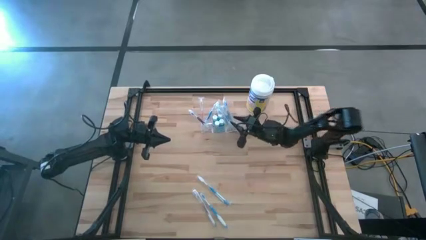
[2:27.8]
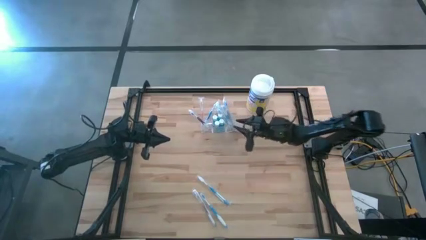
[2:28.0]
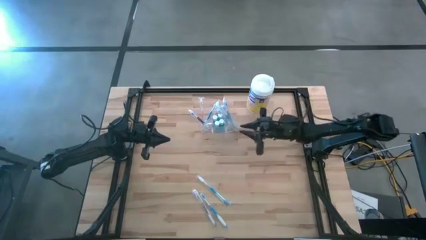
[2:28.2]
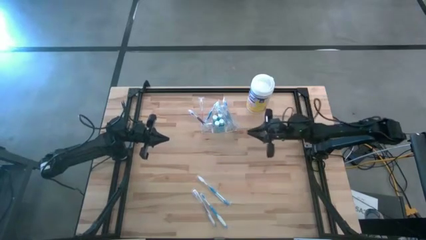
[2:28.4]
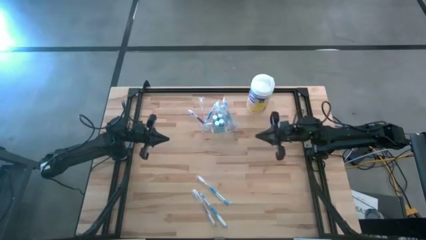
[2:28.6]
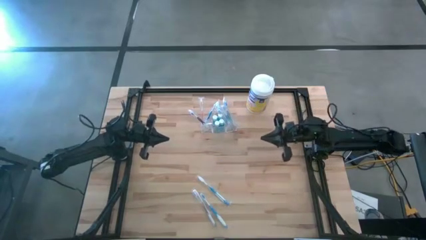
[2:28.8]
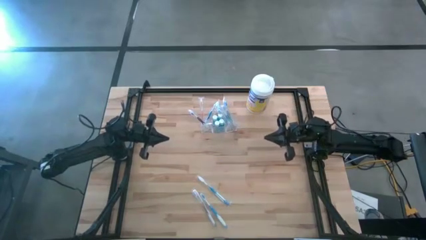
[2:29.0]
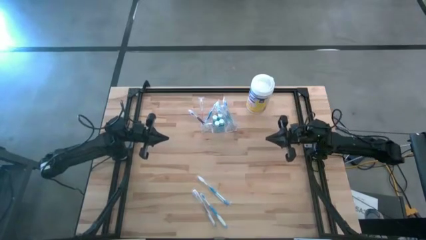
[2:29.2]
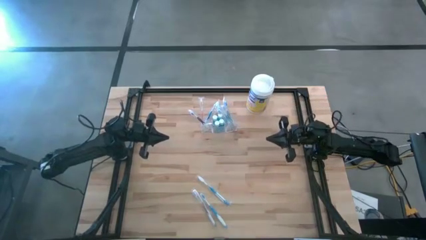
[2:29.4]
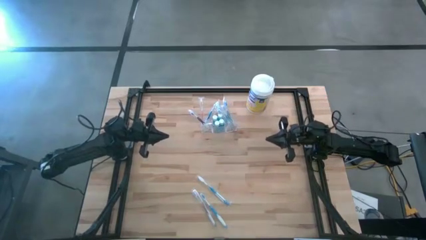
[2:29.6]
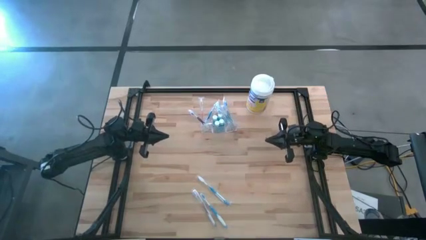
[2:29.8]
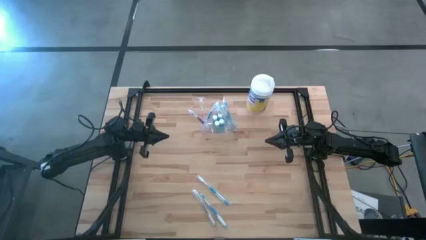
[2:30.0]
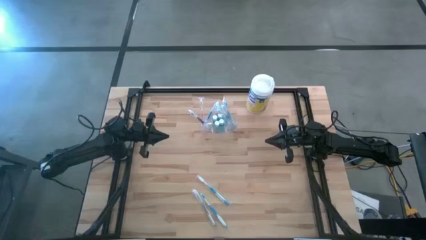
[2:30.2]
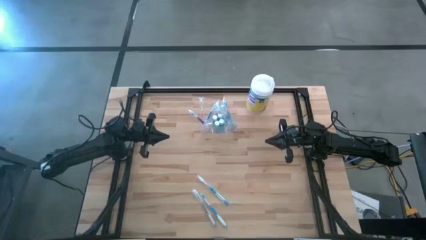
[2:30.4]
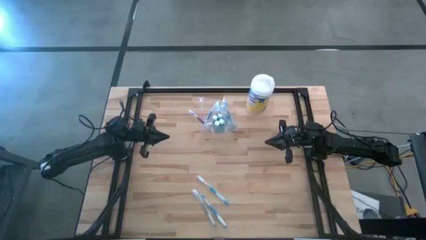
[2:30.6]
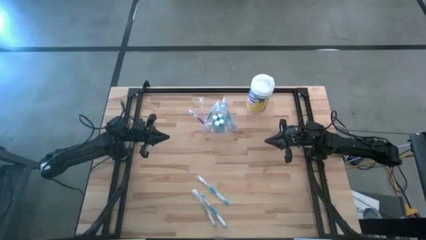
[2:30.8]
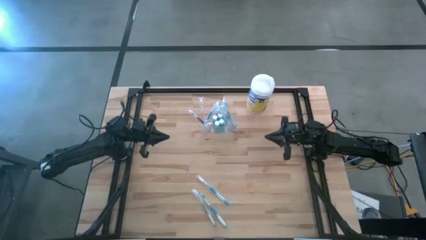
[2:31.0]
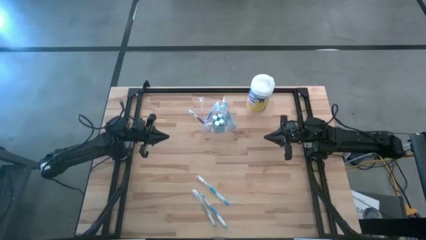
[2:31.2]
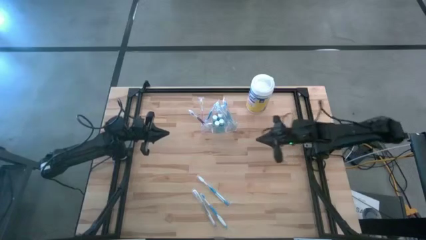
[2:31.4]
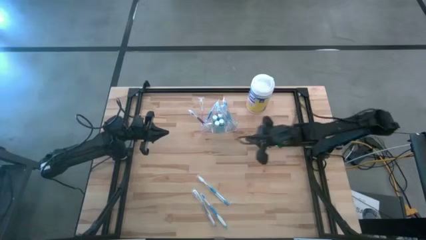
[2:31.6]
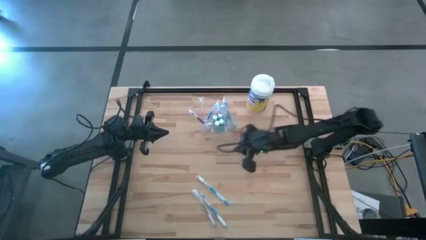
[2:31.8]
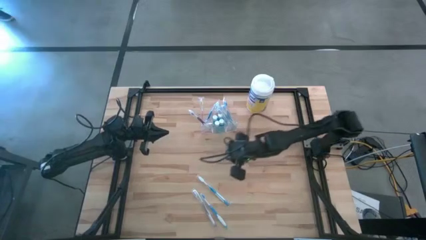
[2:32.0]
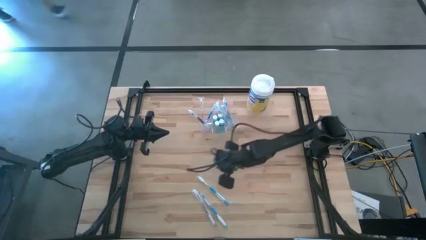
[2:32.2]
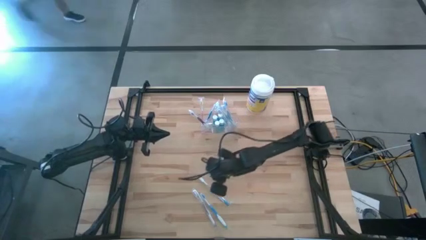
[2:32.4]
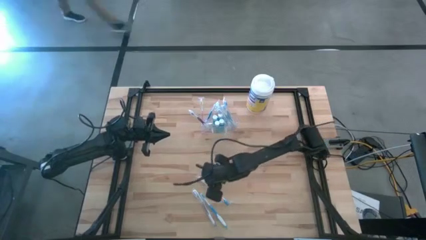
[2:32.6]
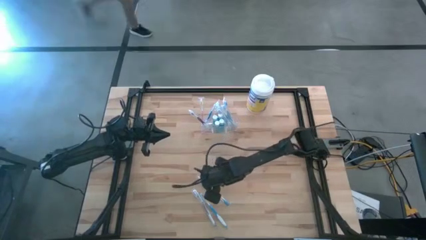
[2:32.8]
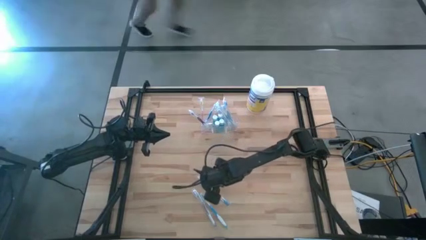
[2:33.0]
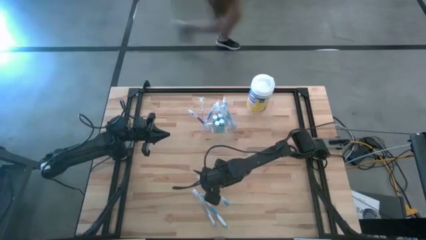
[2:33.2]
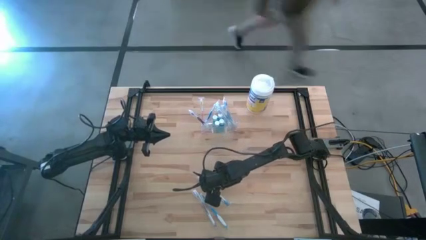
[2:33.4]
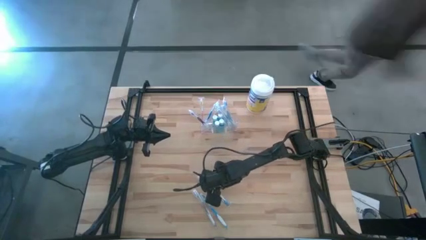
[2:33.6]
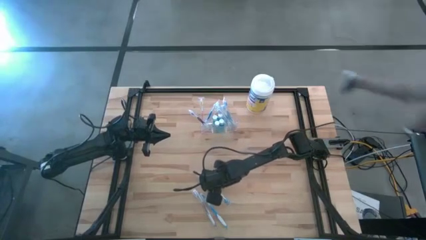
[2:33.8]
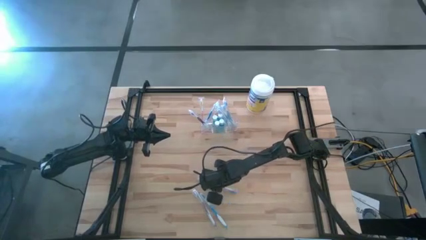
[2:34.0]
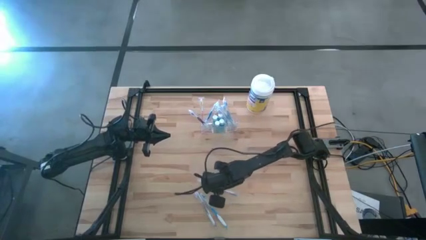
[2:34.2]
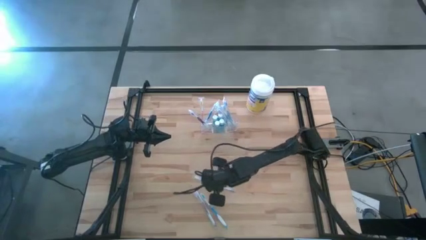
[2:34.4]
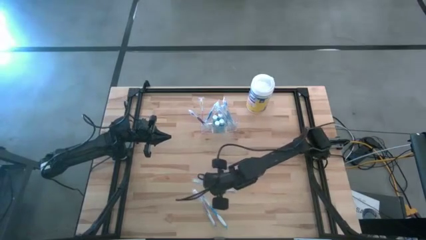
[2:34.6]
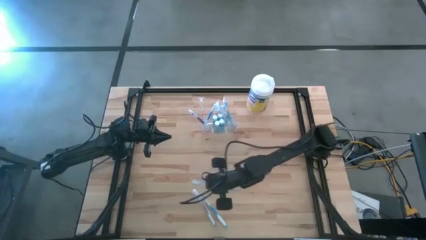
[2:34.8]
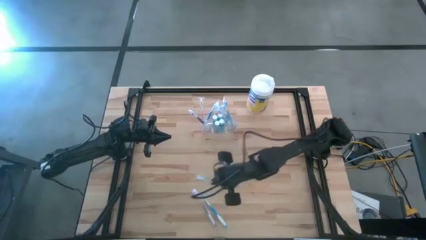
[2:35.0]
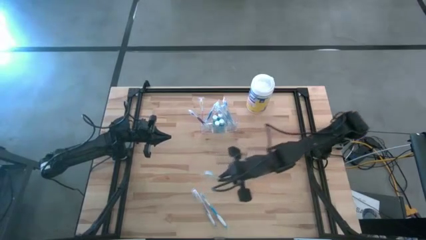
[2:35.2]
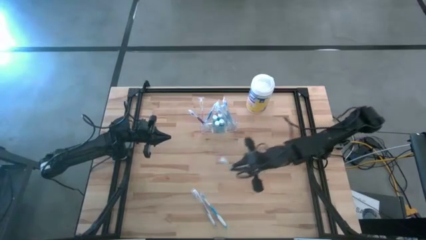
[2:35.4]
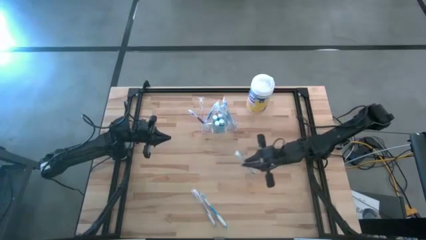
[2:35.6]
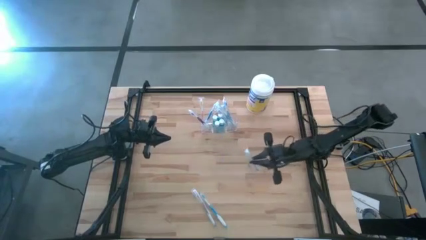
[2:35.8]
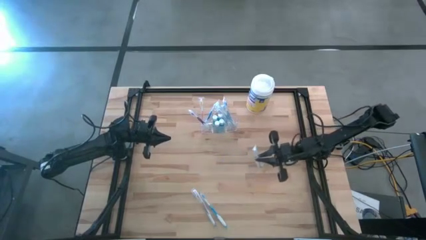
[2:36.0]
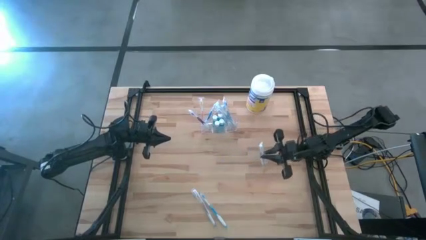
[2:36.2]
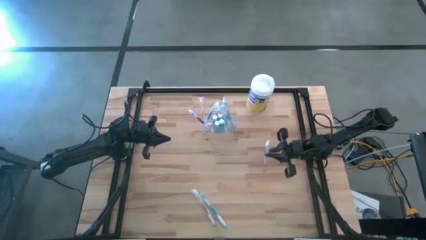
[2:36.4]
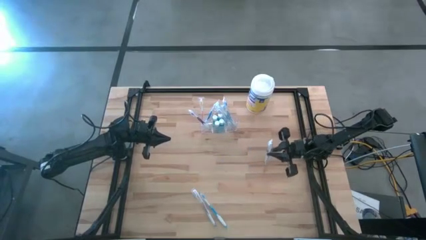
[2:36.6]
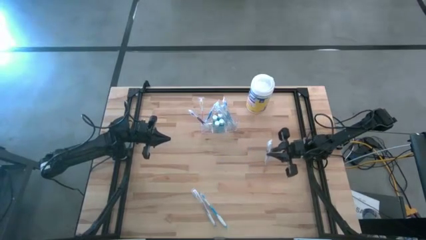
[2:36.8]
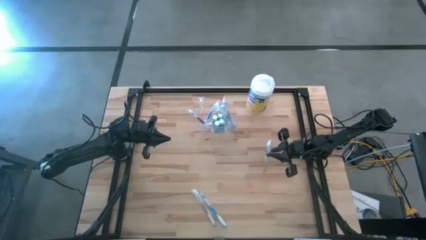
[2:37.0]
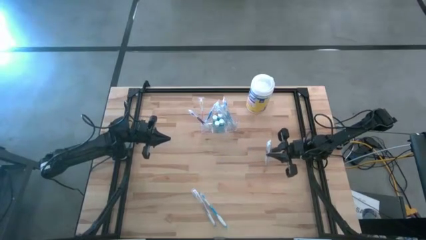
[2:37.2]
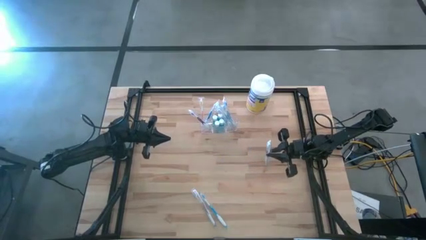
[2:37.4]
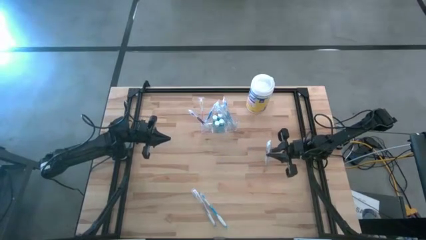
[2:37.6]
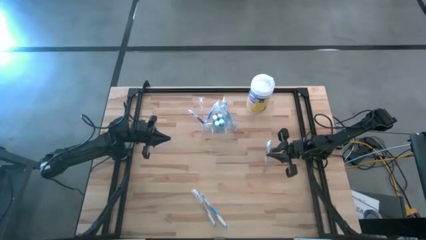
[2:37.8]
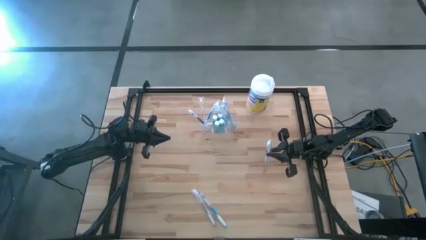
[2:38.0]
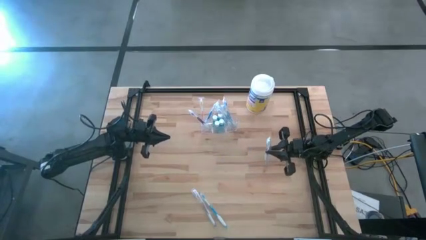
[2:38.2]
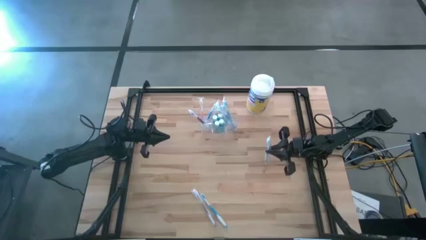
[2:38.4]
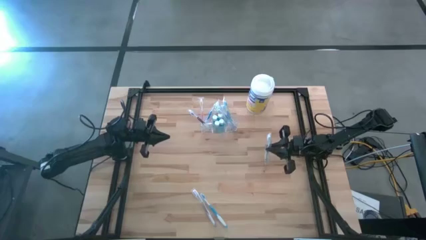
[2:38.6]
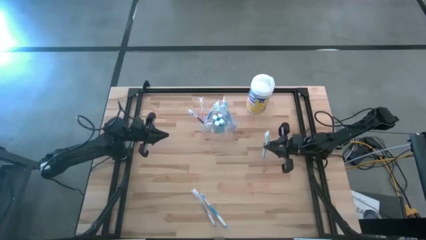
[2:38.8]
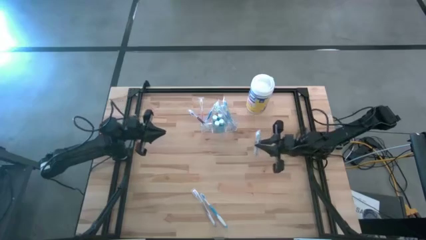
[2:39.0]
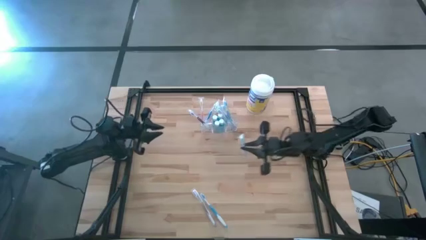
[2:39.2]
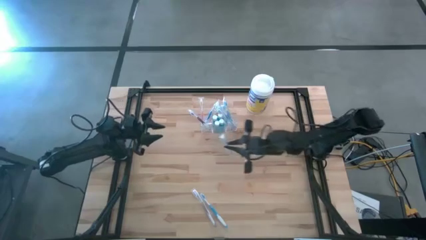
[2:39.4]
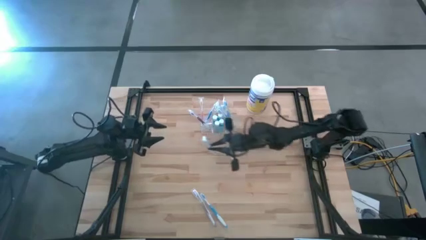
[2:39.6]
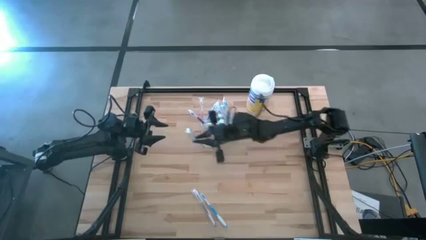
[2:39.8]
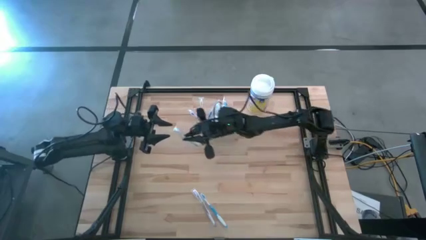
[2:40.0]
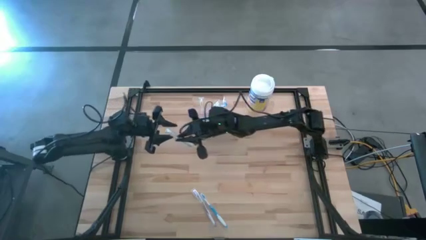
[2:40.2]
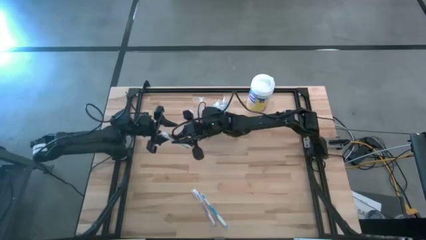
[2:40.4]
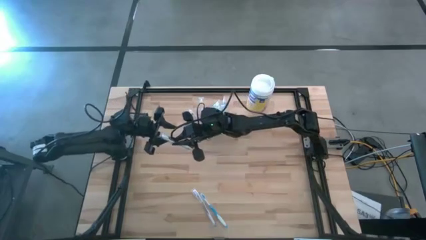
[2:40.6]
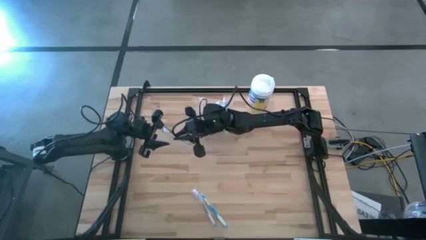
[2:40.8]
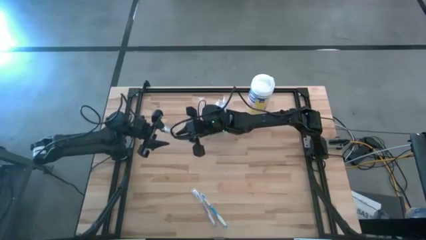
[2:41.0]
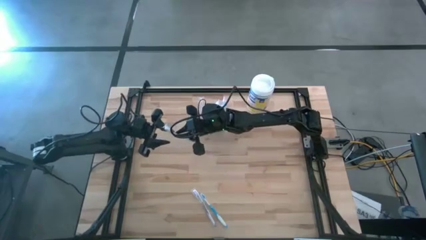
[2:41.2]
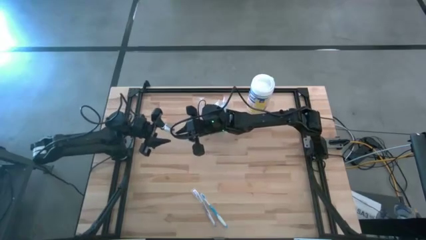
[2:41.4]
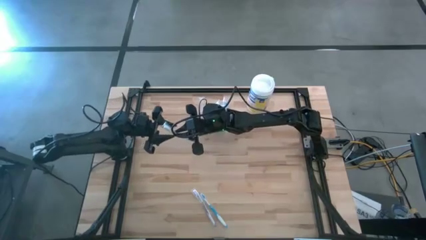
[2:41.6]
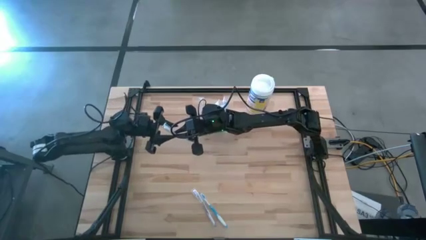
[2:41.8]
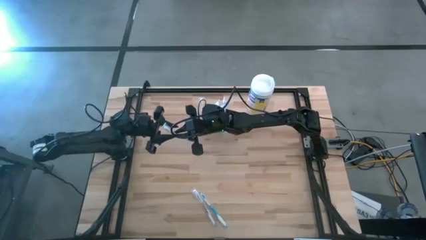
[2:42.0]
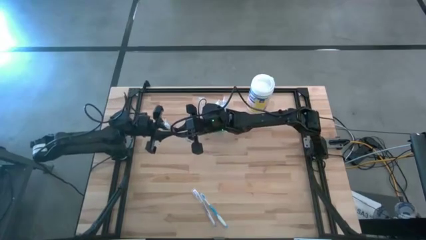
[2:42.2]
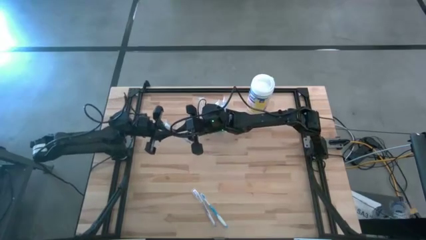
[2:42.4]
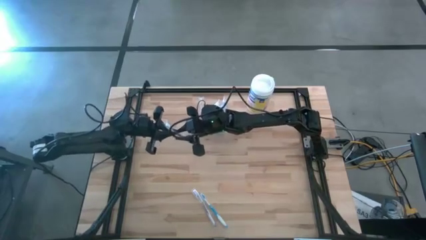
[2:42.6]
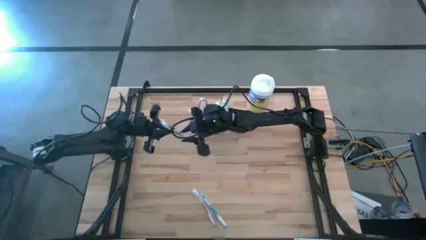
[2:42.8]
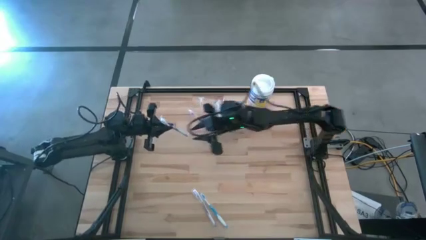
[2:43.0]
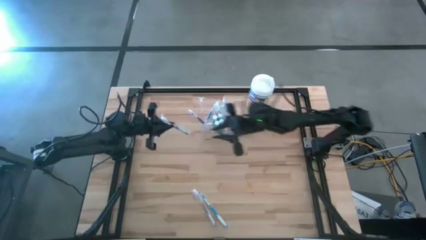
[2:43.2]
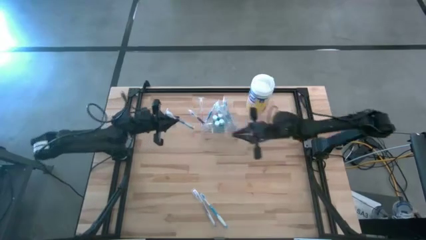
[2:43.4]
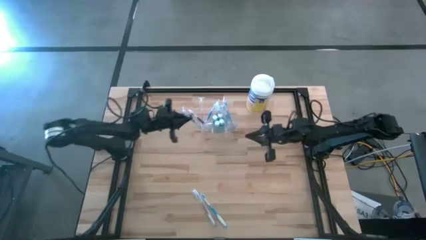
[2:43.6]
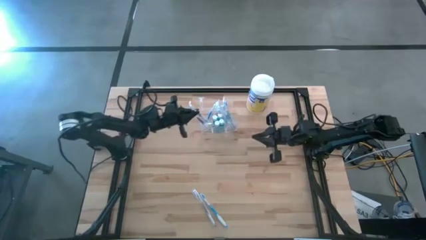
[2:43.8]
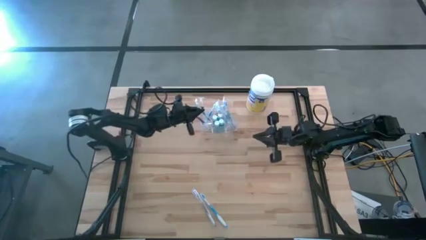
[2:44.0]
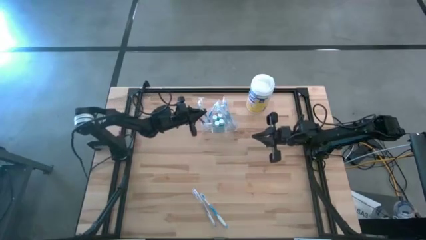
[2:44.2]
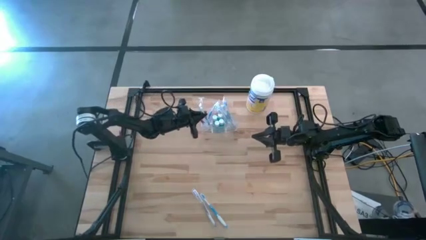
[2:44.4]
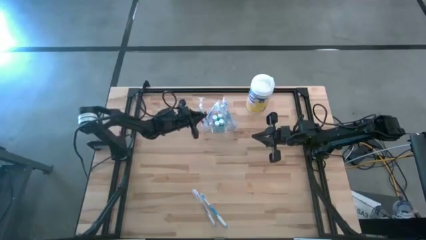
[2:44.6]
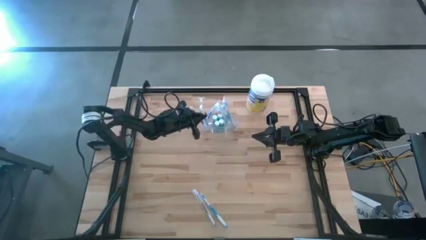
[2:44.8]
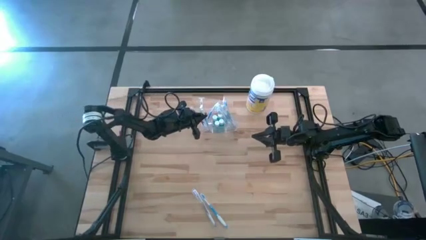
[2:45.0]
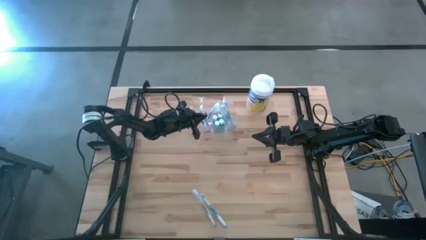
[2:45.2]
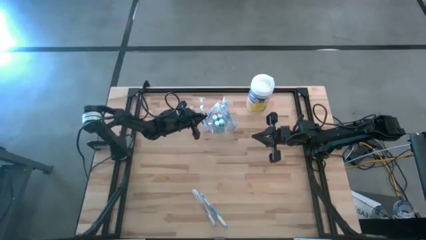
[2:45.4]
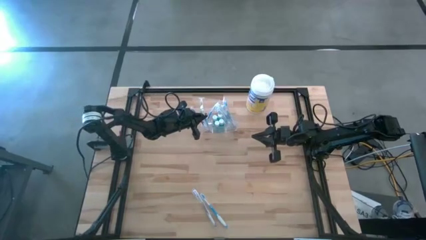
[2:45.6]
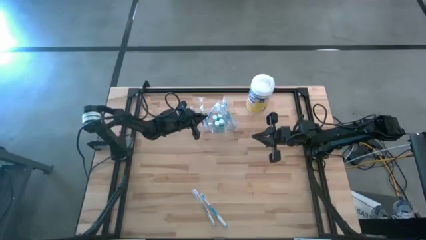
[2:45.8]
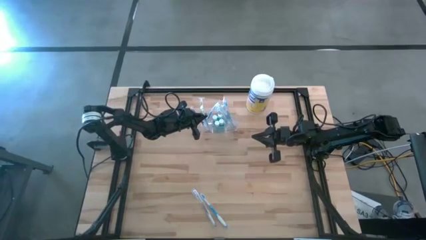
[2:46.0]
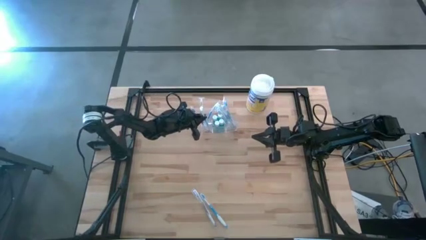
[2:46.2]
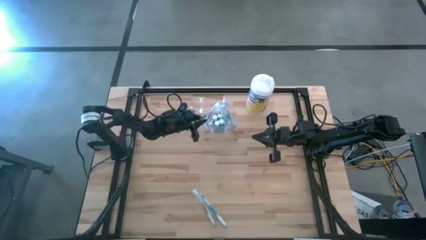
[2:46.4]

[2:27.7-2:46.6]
Task: Pick & Place toothbrushing station
Put the top blue toothbrush into the transparent organizer
